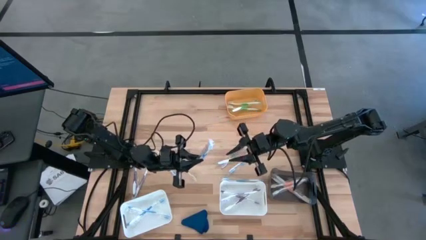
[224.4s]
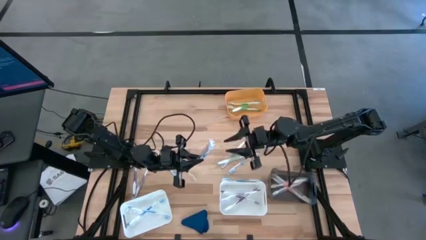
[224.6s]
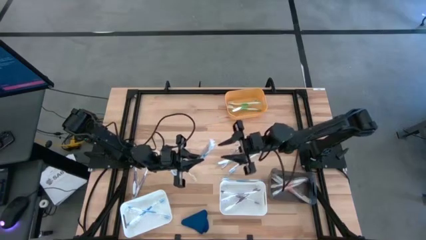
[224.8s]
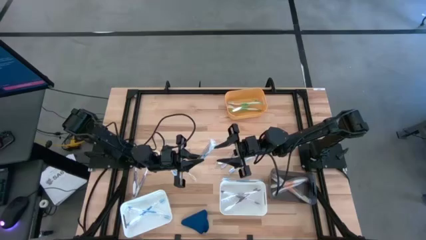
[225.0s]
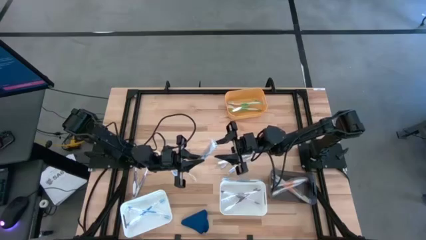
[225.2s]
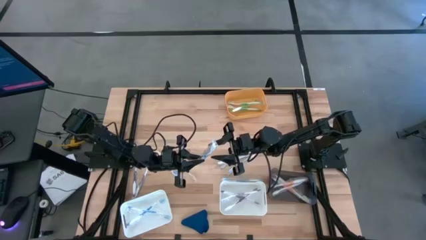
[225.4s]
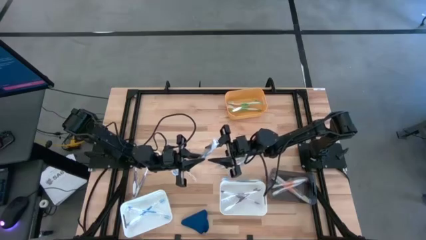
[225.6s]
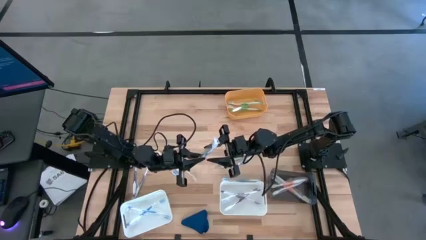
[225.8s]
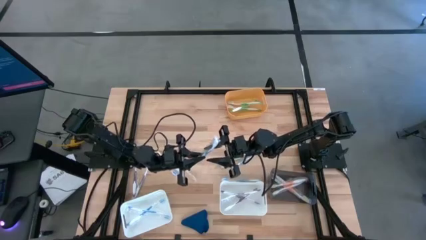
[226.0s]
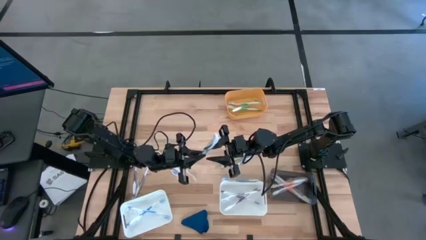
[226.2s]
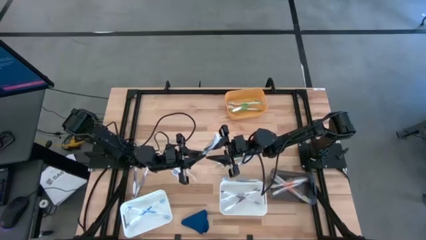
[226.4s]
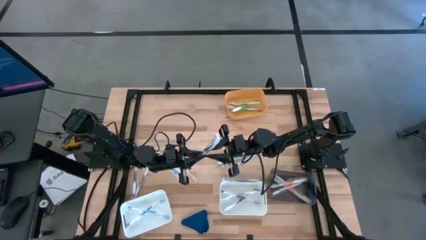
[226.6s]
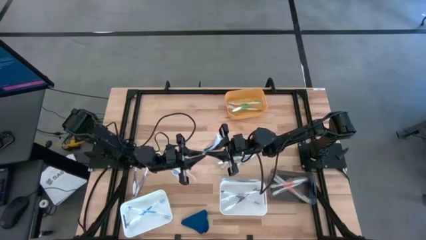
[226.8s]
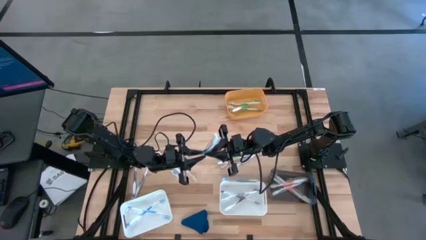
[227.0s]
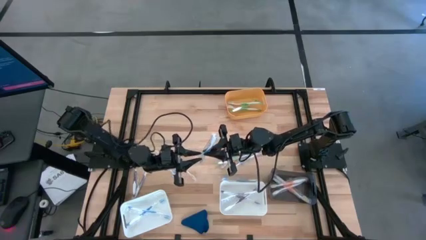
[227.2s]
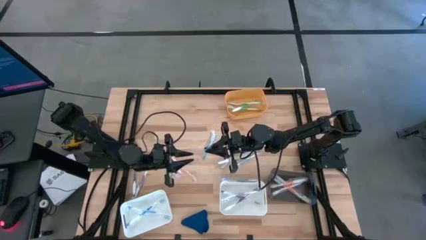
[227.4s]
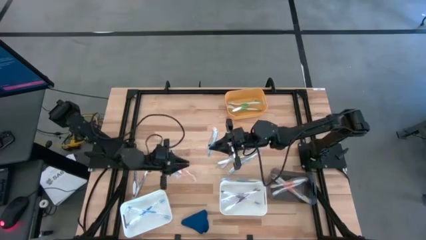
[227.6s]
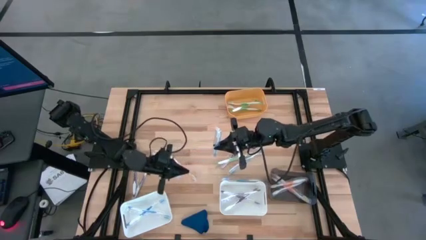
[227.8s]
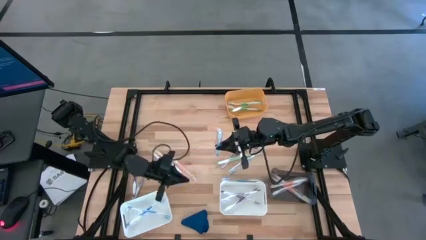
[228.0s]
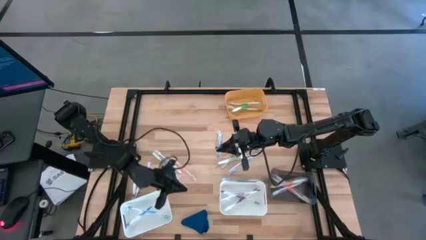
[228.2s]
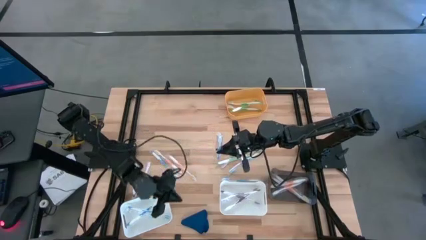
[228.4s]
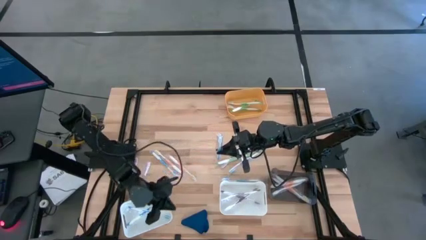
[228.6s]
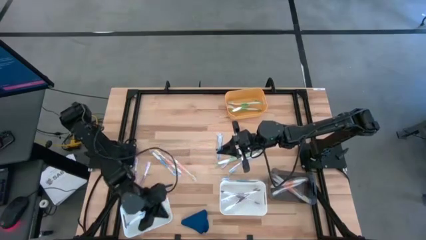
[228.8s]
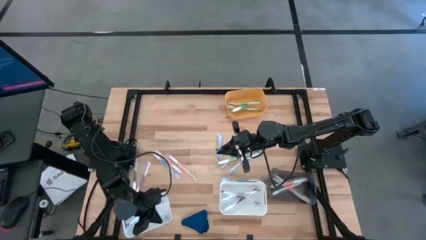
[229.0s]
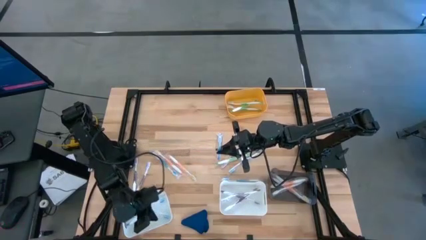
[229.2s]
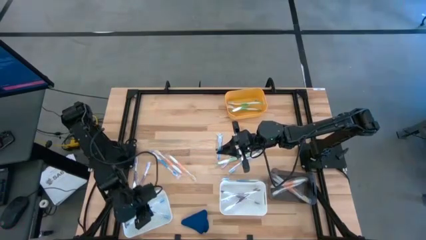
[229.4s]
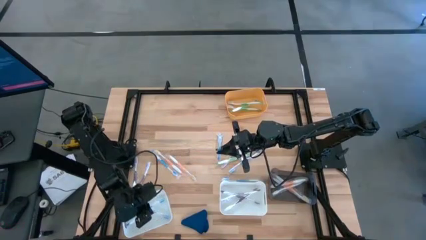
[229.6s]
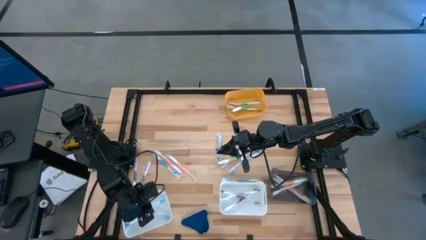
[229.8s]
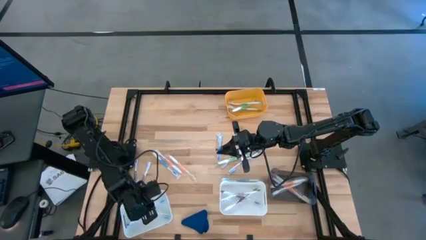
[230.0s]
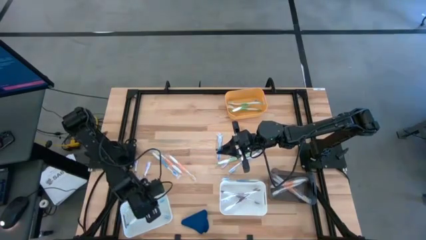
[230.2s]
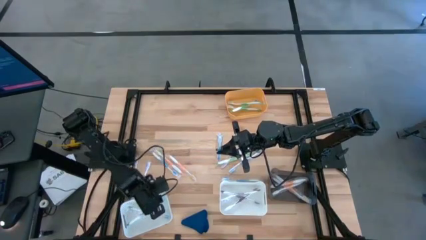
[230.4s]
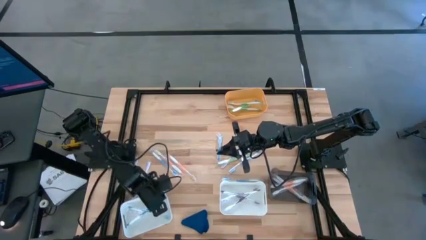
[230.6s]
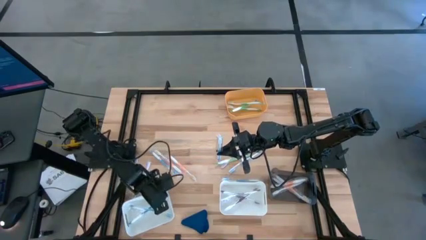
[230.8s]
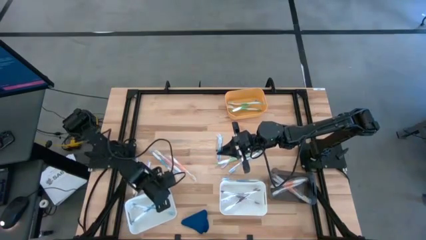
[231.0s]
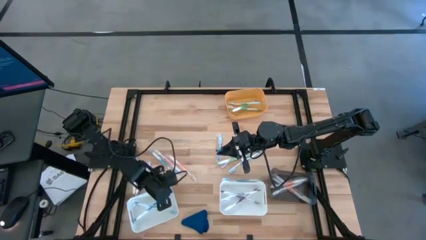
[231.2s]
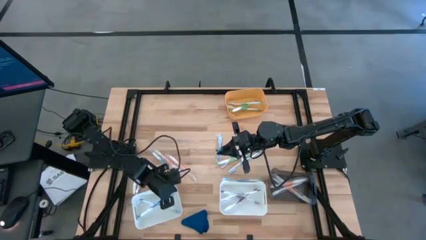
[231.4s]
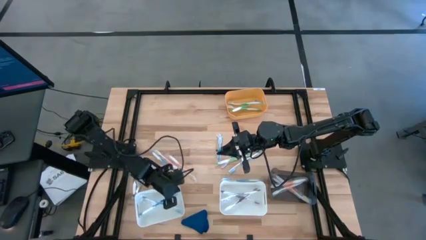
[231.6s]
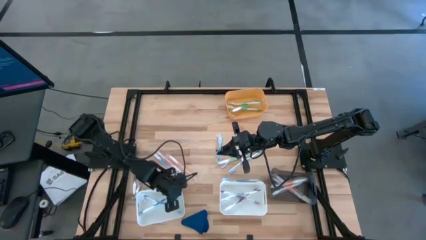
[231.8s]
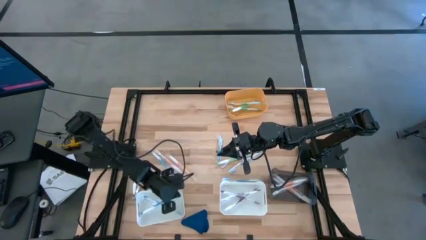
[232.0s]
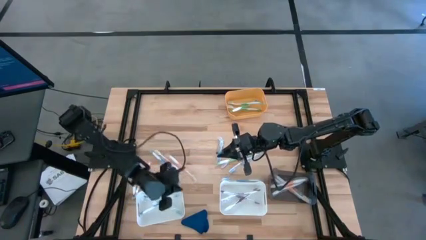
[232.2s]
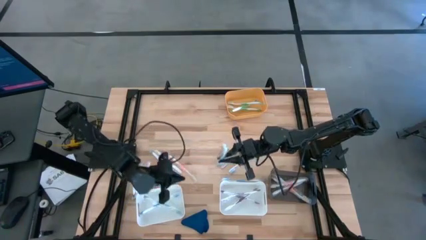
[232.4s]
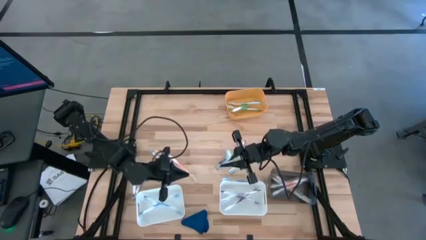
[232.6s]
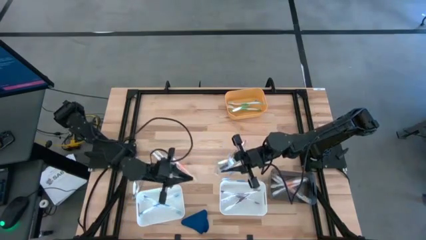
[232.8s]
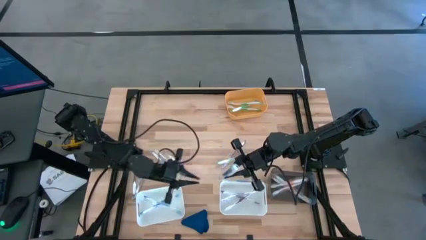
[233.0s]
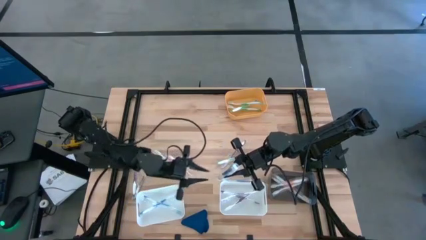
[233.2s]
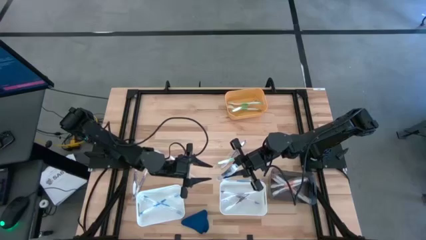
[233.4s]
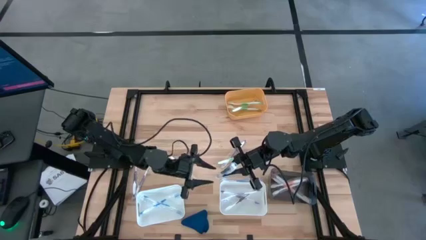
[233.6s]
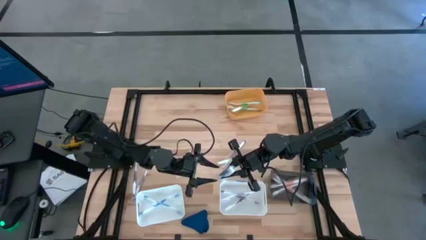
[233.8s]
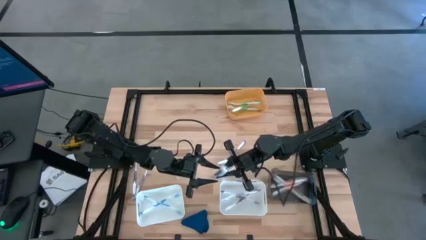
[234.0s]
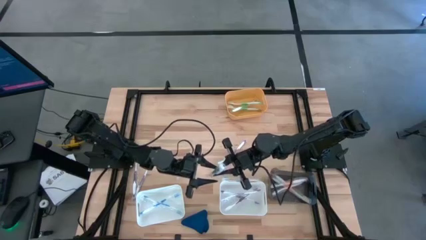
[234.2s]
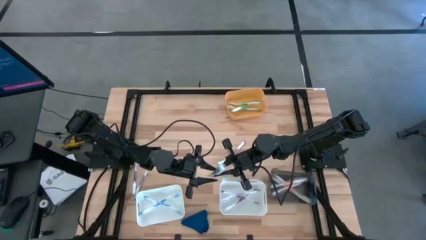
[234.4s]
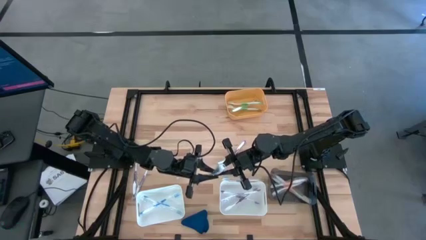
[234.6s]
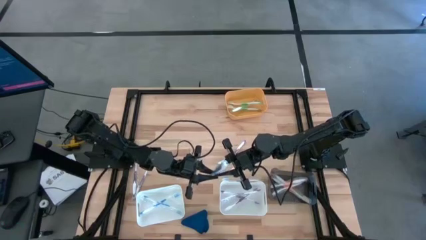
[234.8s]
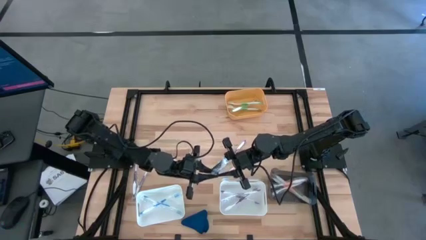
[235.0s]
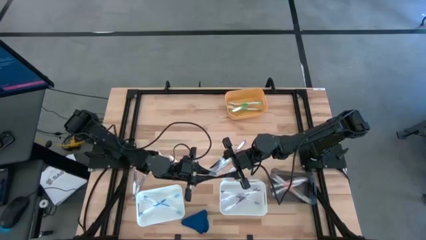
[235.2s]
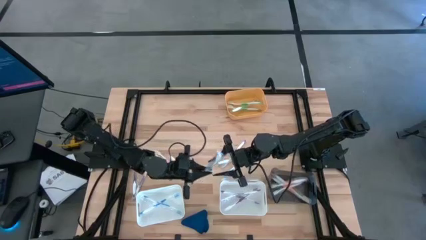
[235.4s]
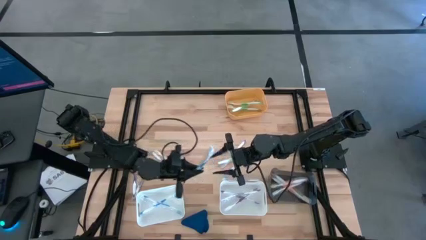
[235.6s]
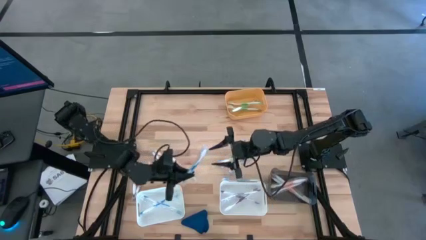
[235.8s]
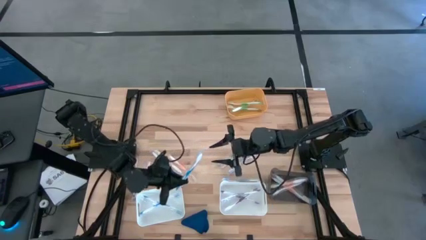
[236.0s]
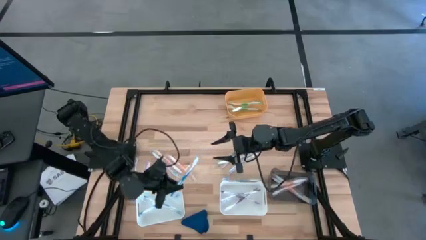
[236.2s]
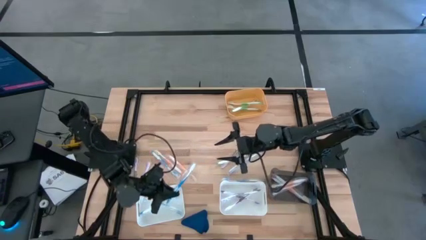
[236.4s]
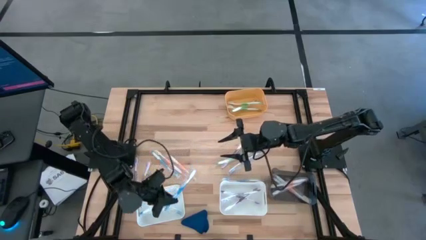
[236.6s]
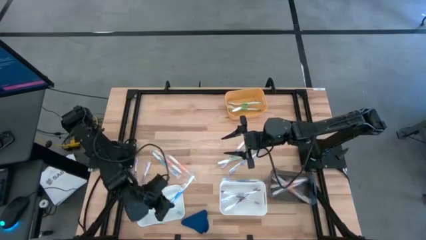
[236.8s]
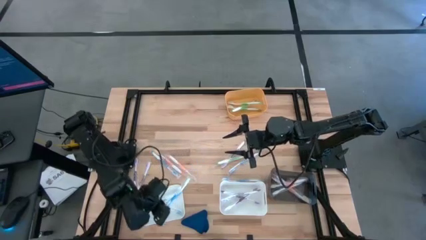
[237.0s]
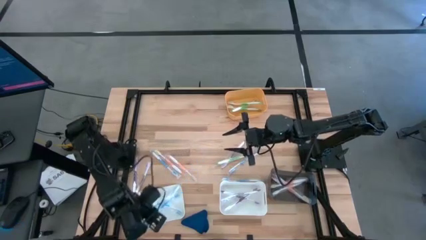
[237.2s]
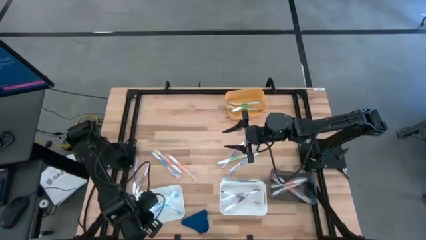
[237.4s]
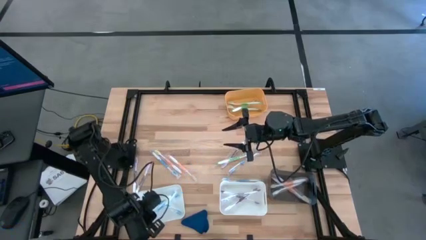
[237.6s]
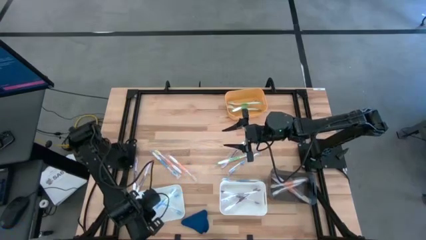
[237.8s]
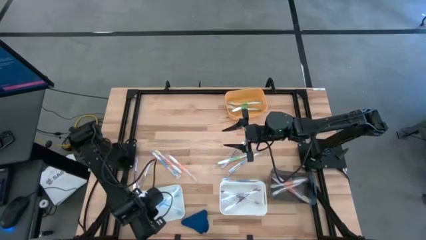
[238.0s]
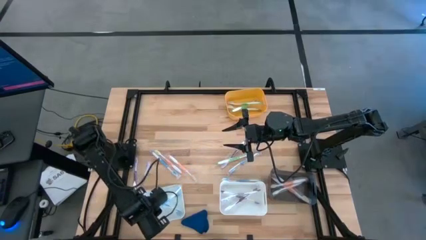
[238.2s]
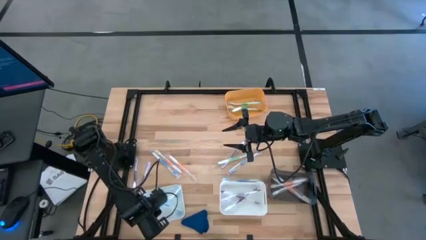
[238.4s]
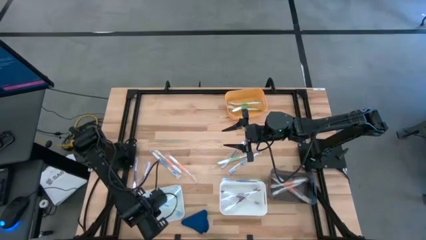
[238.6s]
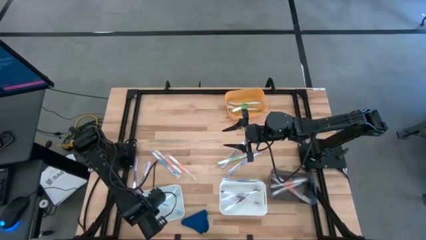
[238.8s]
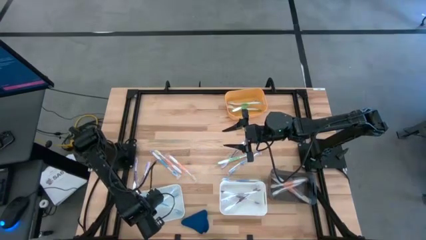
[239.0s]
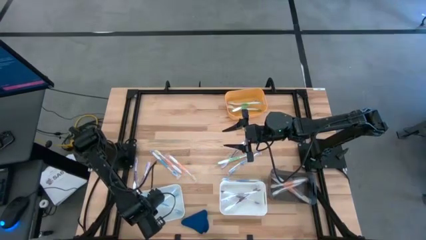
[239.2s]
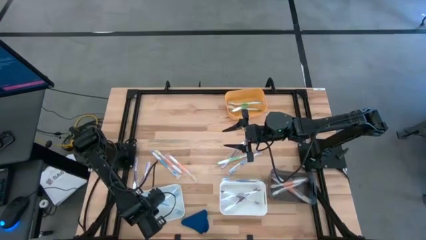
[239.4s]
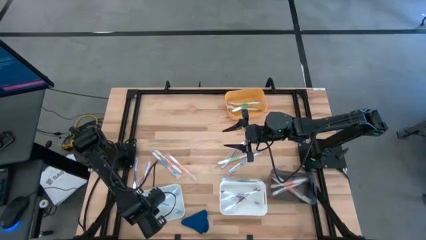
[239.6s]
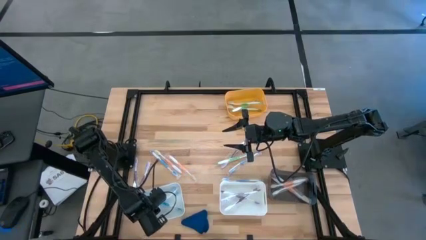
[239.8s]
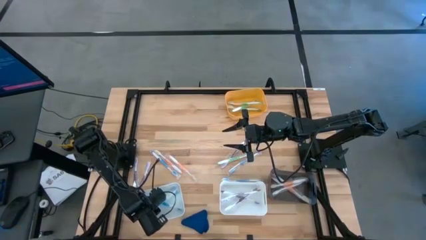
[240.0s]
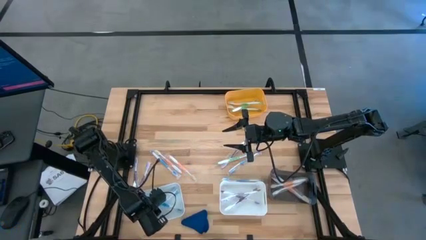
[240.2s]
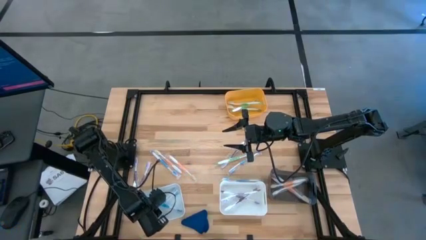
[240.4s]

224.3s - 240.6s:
Task: Pick & Place Toothbrushes
Put the blue toothbrush into the left white bin
